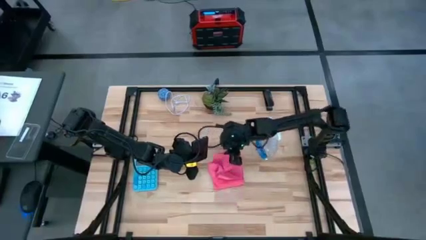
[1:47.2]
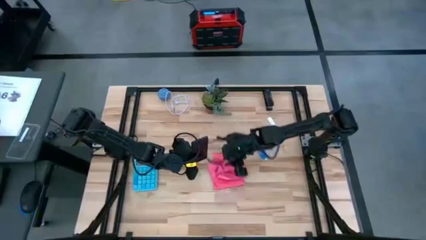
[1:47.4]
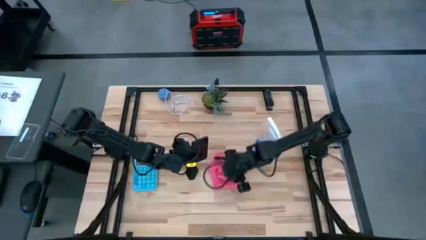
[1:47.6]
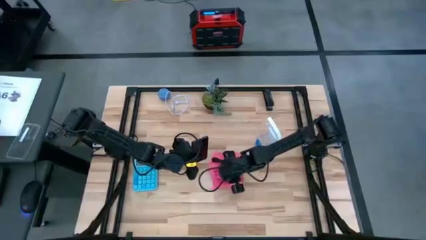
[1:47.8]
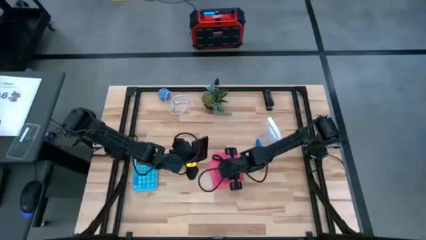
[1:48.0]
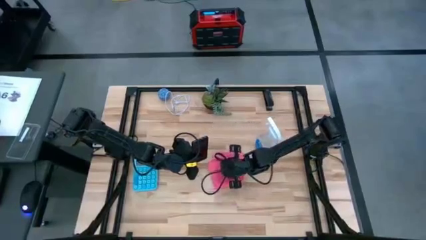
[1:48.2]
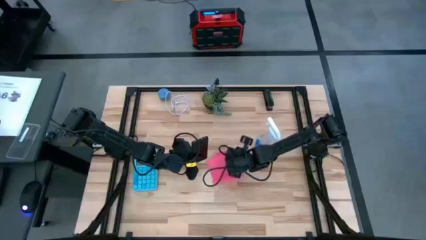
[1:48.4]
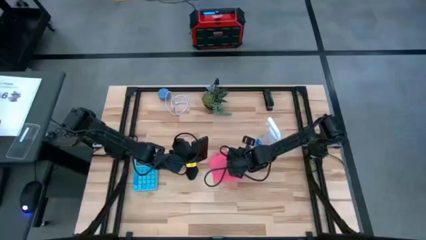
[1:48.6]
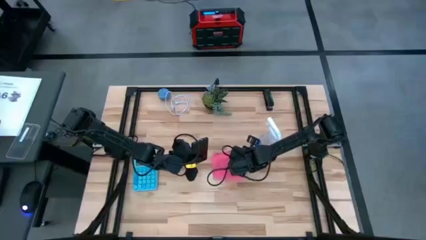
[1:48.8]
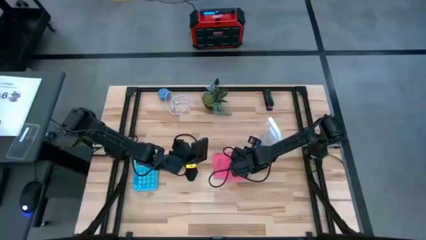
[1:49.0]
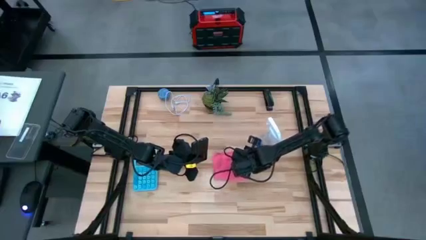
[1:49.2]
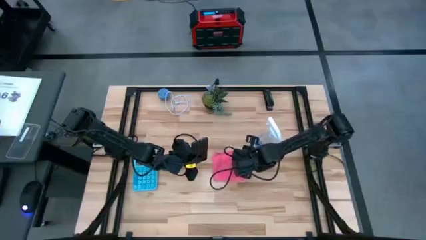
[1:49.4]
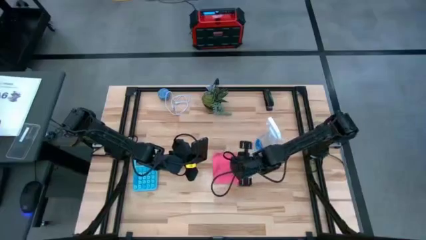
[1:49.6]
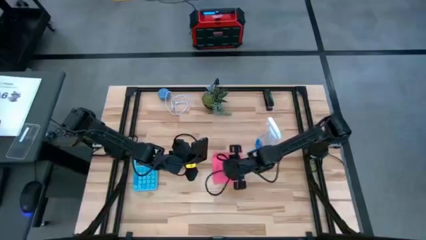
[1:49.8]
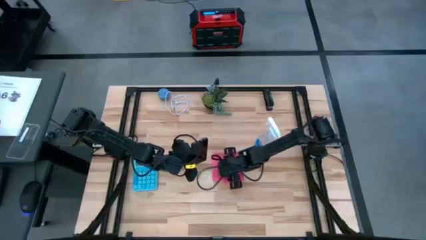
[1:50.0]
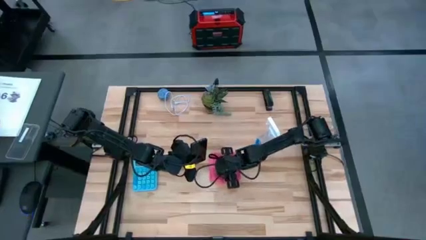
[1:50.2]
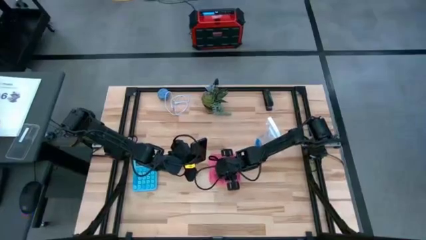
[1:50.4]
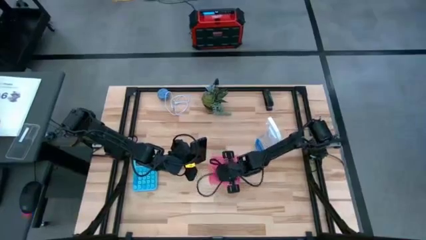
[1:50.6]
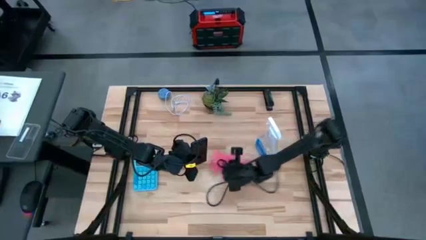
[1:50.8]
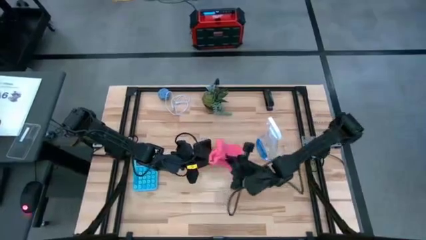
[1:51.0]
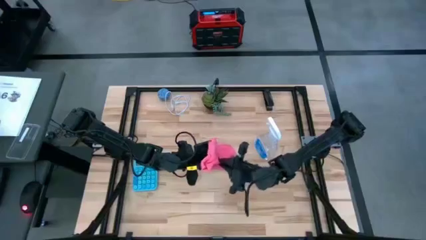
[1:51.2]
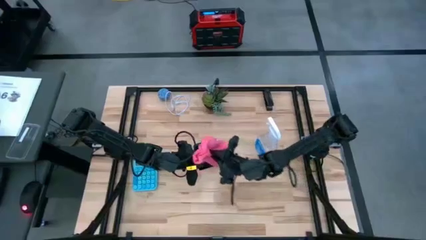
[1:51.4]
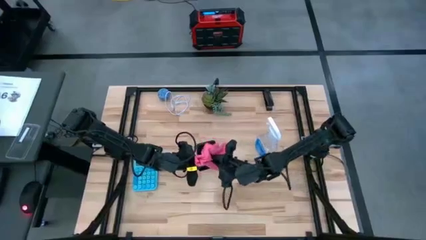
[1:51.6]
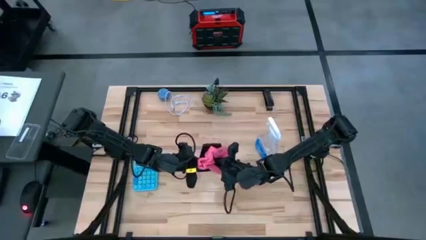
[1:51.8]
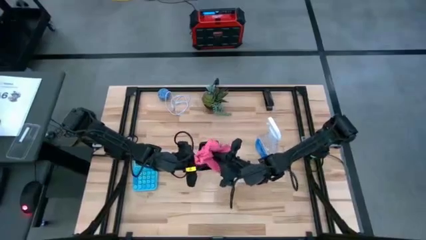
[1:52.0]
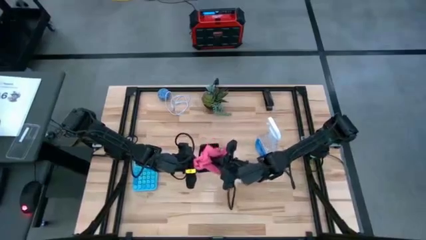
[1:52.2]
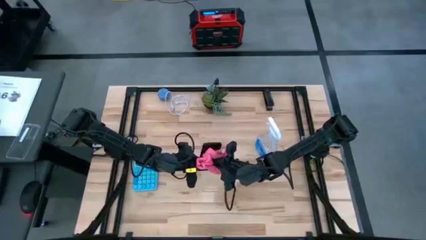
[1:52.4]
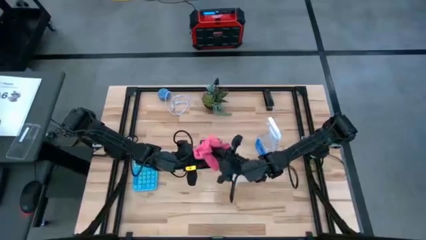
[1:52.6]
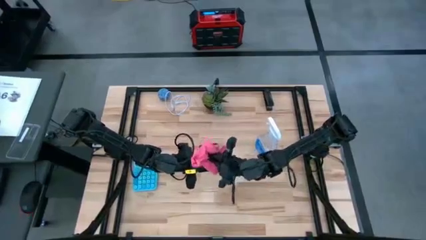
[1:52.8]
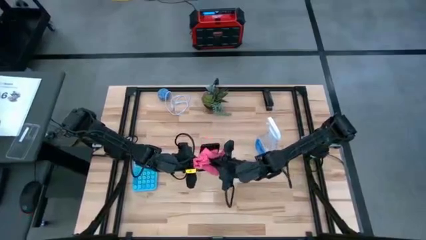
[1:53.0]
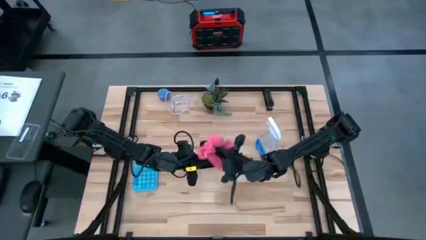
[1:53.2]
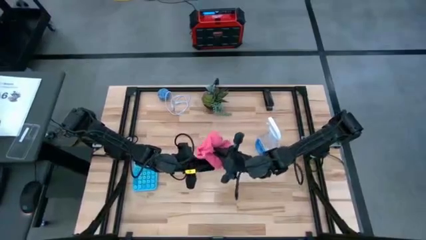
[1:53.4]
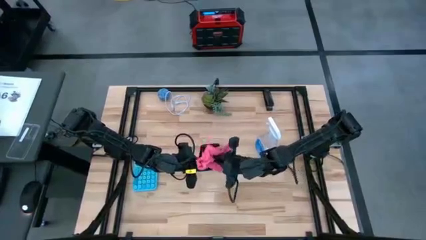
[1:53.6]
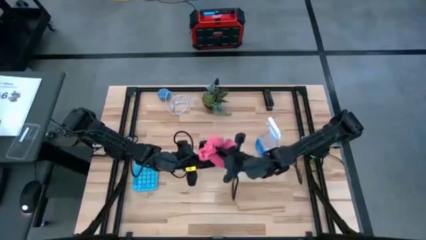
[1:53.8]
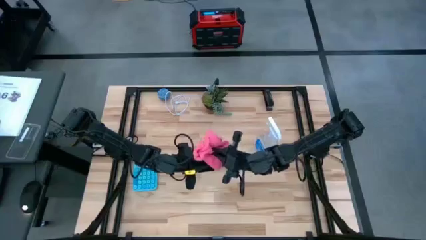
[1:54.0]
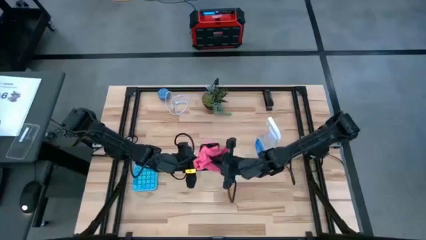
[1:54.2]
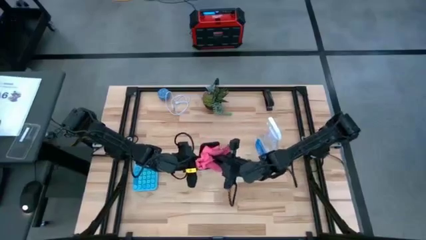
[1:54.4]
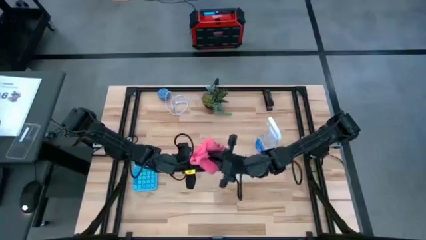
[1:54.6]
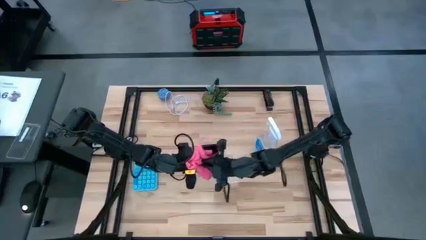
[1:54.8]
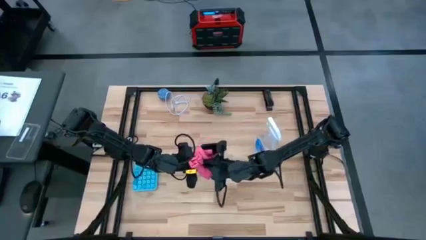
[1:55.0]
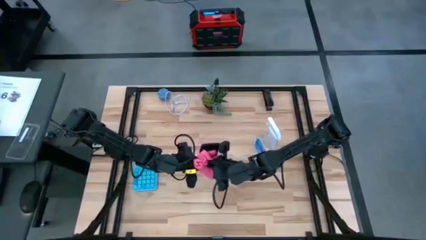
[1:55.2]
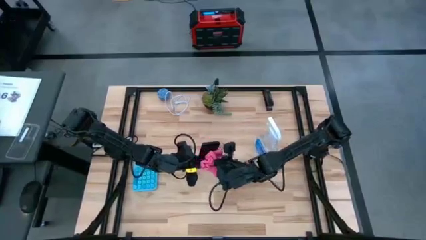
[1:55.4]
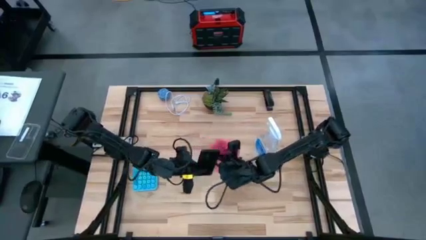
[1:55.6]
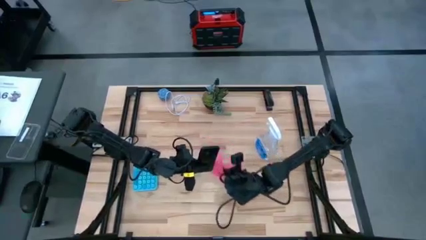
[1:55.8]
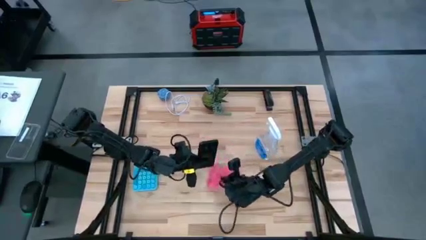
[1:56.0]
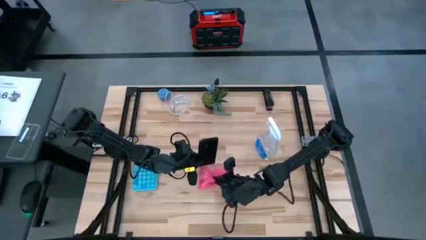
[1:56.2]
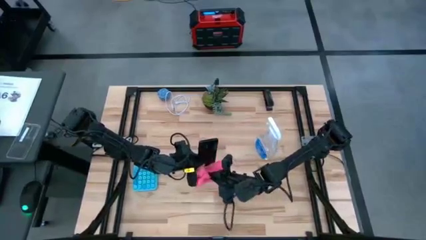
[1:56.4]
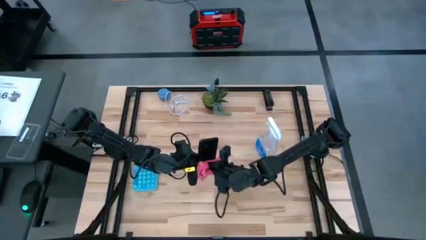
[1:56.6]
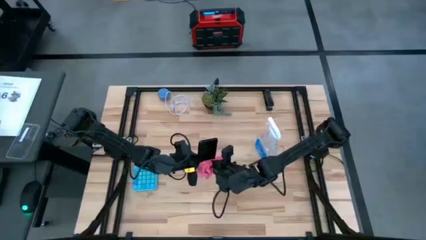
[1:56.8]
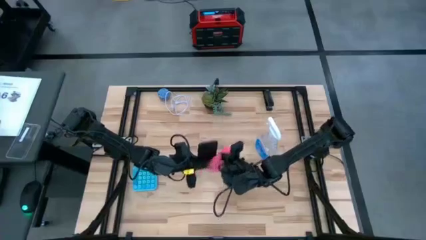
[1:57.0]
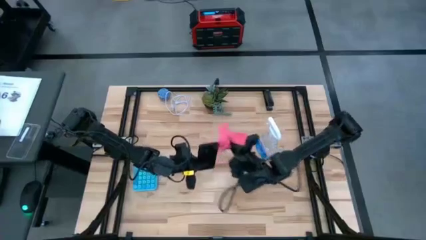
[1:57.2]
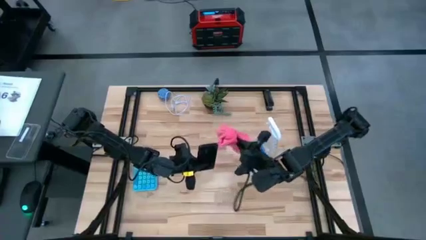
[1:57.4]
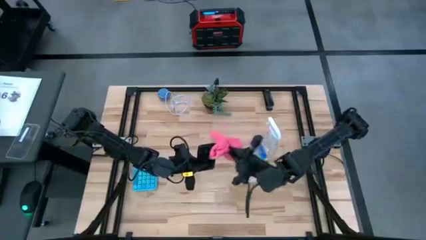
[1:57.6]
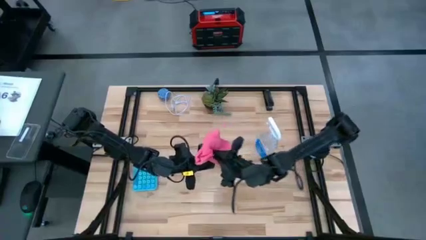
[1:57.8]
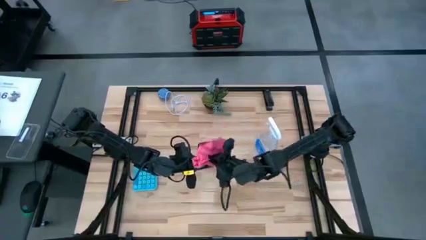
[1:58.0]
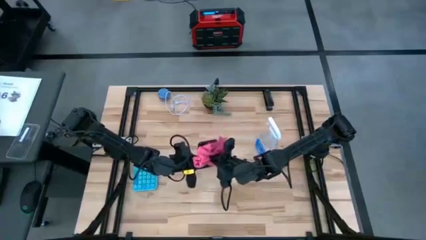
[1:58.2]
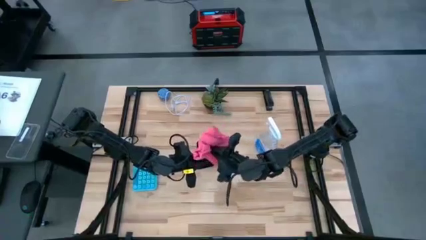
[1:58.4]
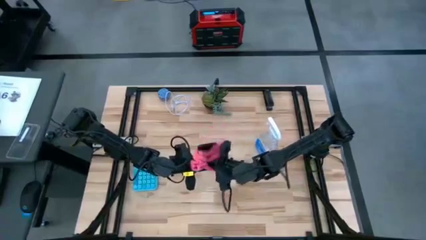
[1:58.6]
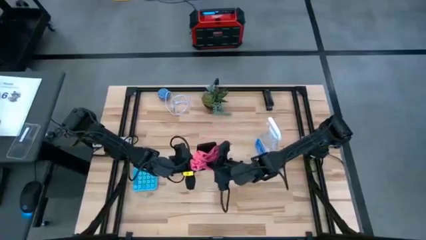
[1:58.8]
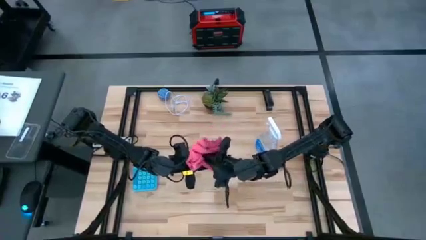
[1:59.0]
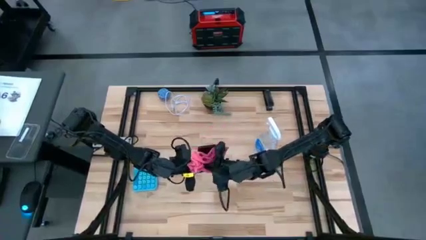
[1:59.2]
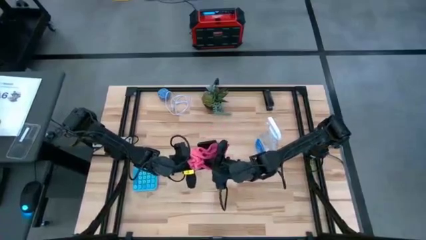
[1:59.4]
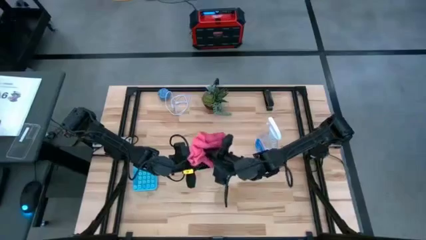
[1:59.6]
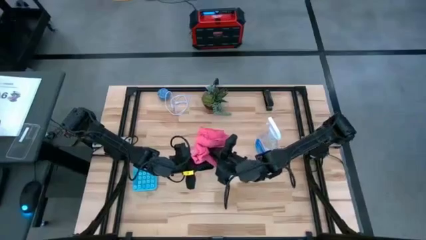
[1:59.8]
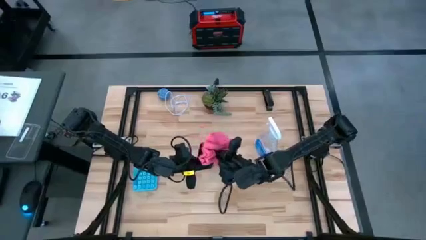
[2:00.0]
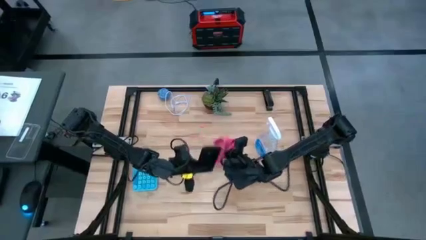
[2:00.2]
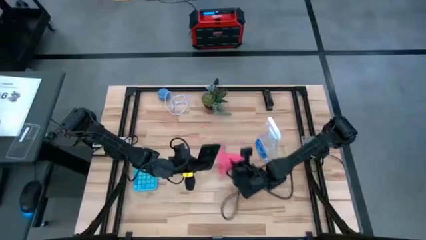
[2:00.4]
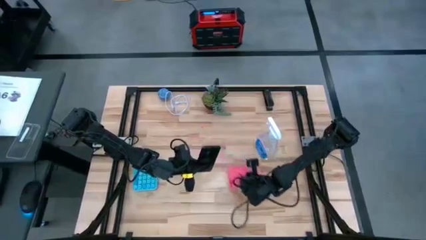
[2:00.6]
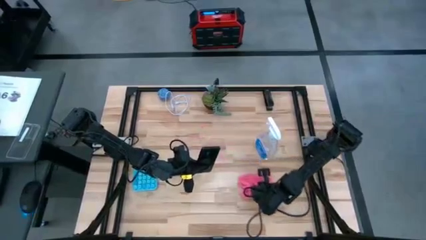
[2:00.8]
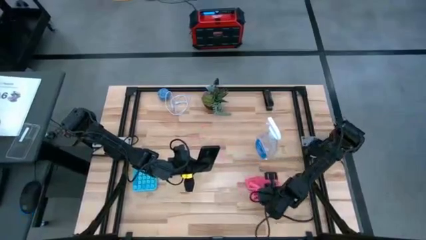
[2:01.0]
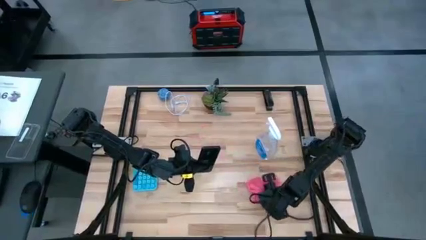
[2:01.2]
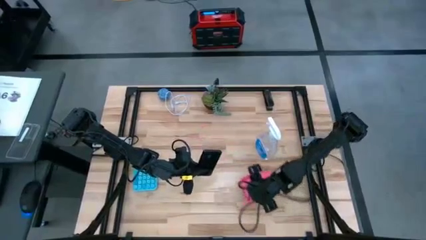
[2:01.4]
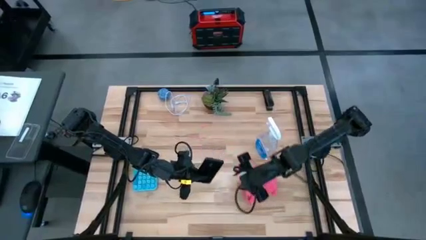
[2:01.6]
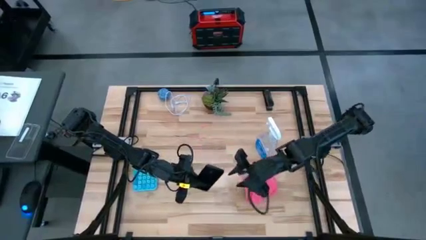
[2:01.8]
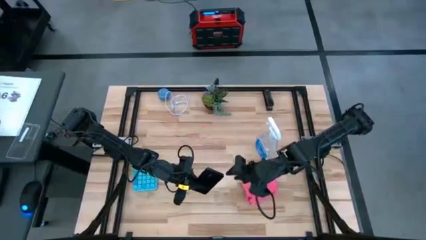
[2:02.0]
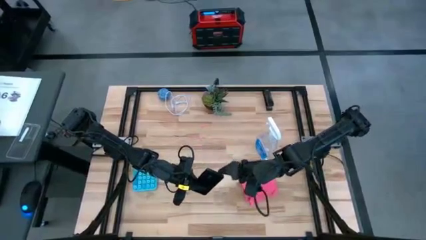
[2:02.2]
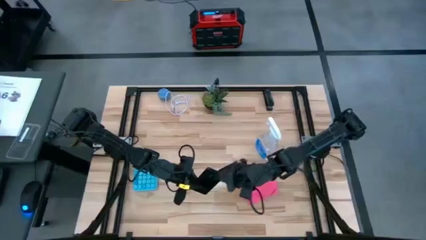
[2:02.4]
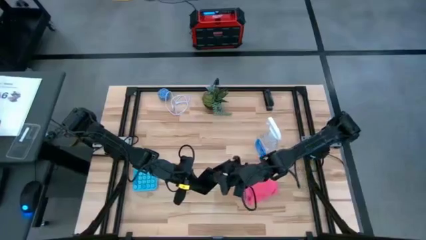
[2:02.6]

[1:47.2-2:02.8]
Task: Apply microfiber cloth
Wipe the back of the cellphone with a microfiber cloth

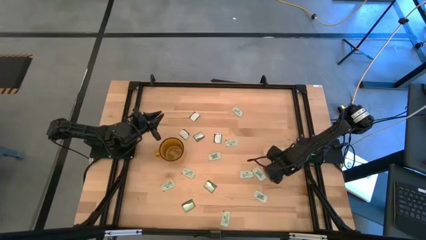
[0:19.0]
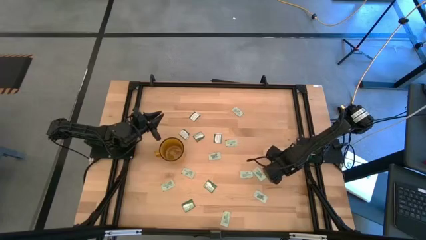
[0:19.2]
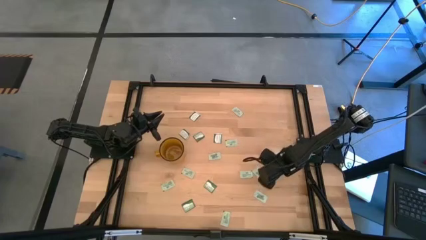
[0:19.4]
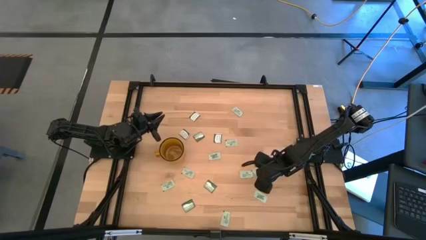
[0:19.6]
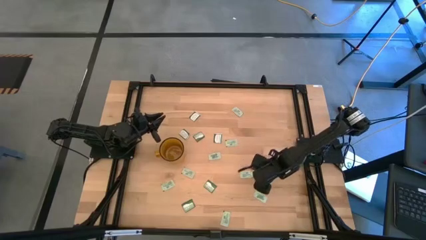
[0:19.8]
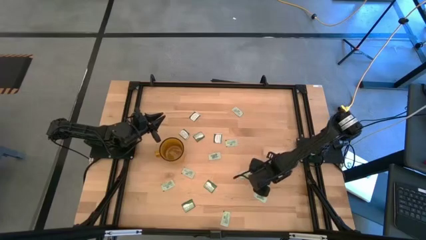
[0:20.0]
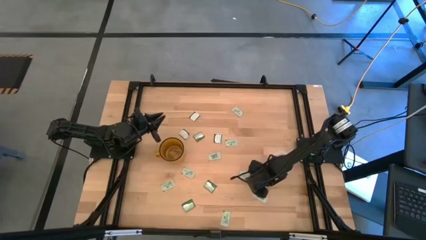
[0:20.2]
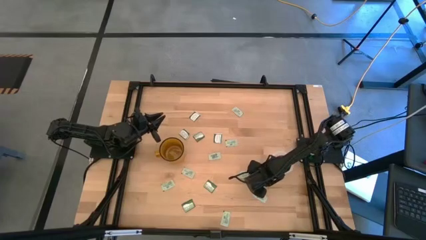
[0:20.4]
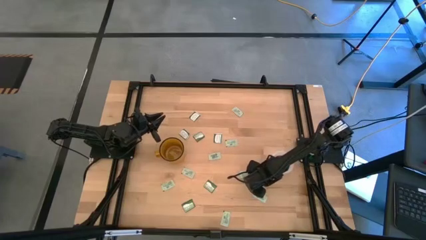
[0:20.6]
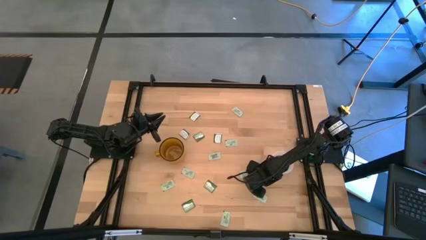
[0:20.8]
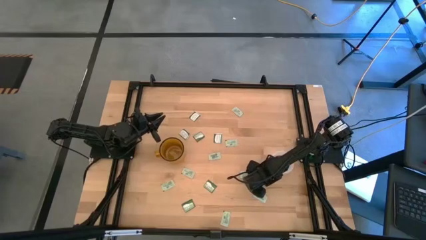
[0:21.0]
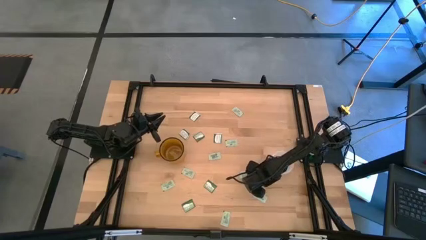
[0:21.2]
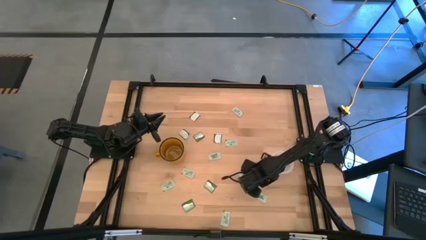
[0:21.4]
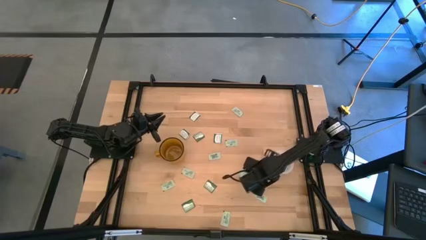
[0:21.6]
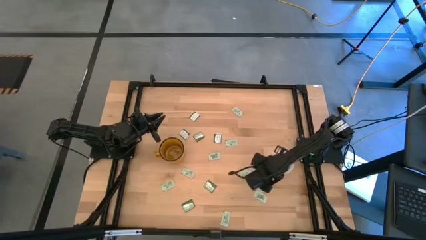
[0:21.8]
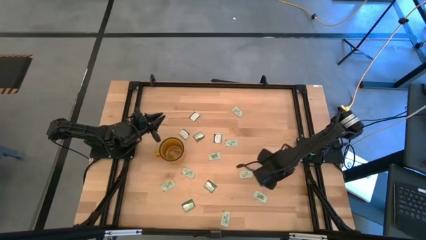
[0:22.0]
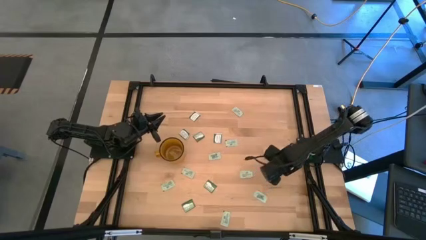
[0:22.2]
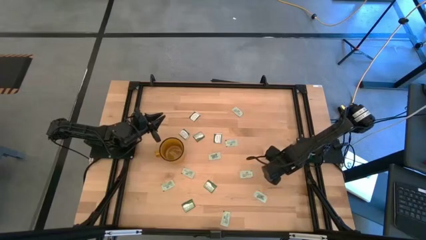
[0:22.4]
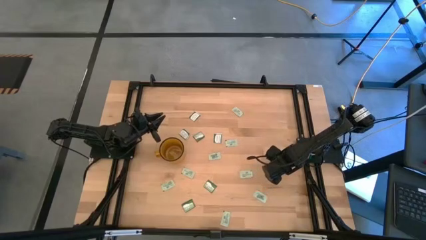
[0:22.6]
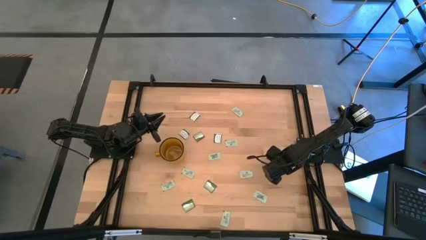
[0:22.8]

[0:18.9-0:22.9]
Task: Pick and place Stevia / Truvia into bins
Put the green stevia packet into the transparent container
